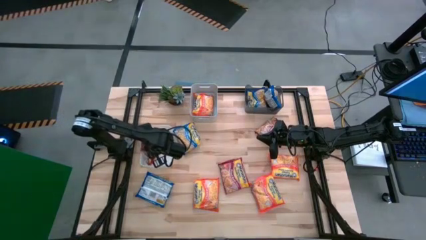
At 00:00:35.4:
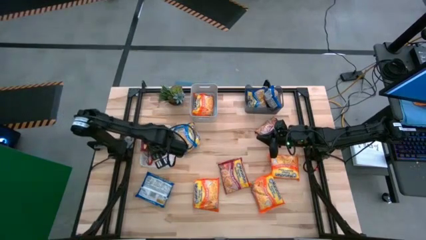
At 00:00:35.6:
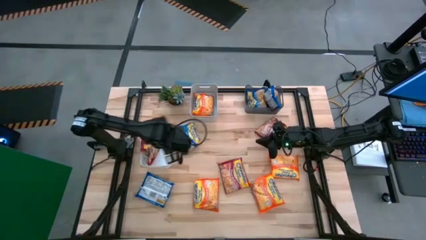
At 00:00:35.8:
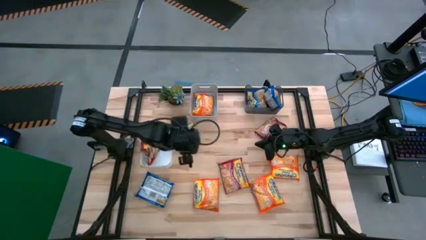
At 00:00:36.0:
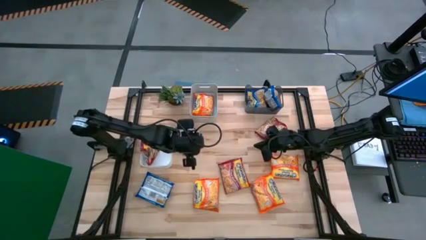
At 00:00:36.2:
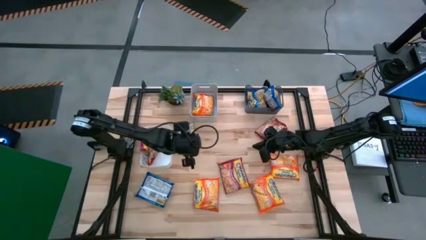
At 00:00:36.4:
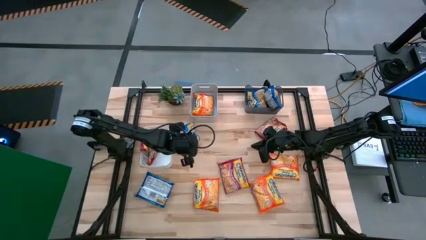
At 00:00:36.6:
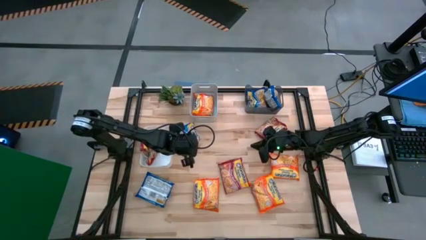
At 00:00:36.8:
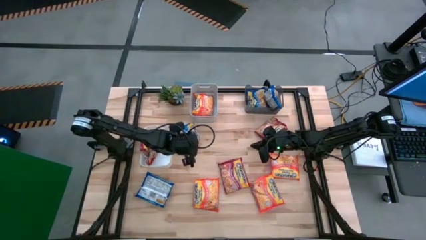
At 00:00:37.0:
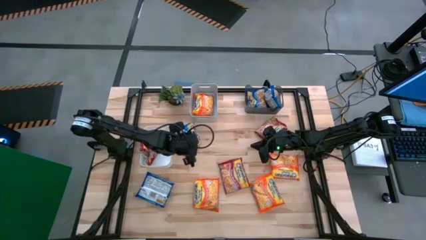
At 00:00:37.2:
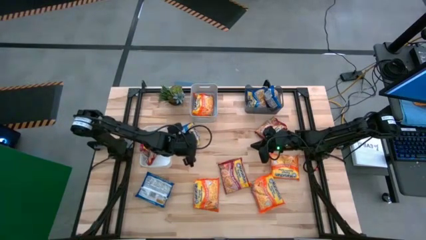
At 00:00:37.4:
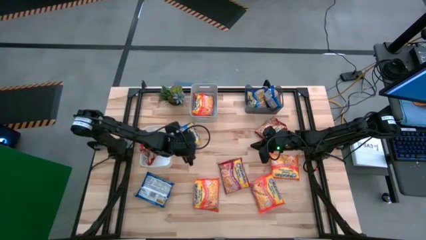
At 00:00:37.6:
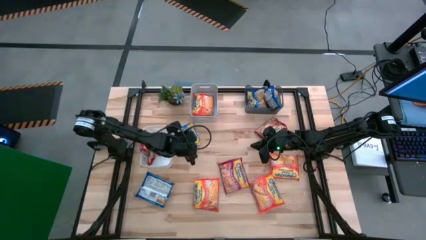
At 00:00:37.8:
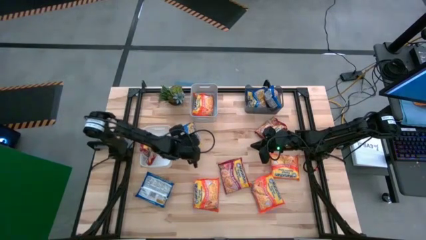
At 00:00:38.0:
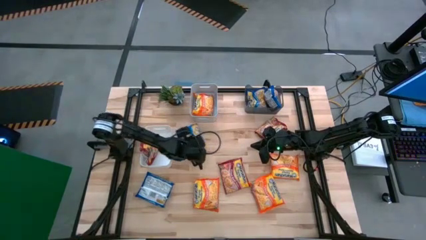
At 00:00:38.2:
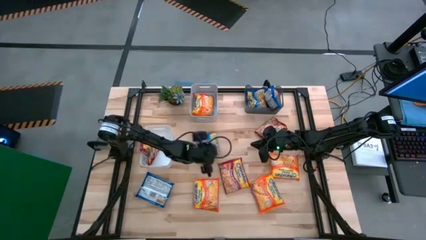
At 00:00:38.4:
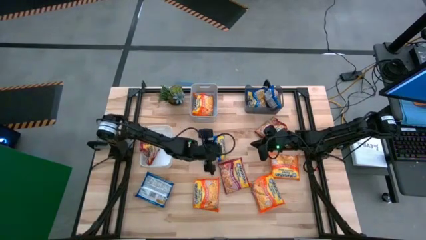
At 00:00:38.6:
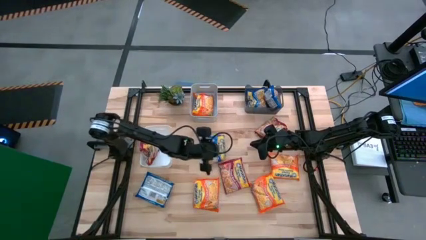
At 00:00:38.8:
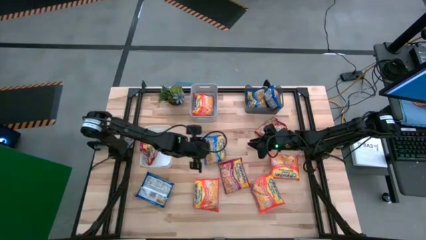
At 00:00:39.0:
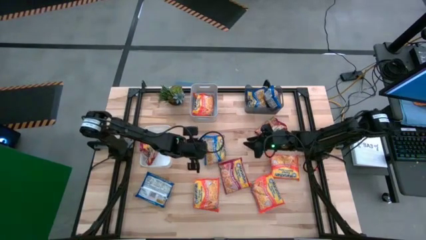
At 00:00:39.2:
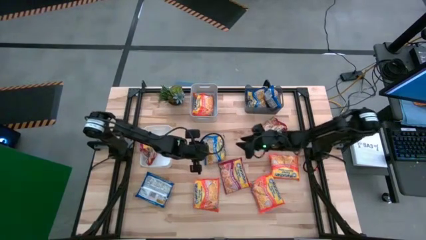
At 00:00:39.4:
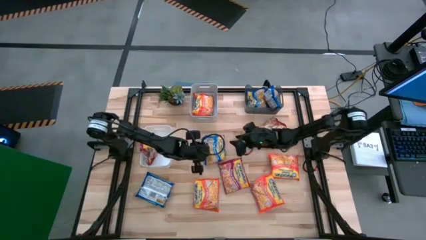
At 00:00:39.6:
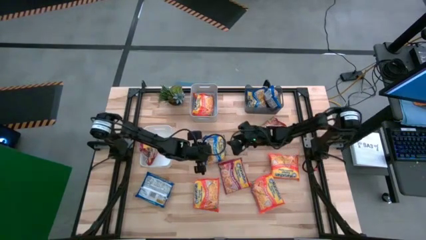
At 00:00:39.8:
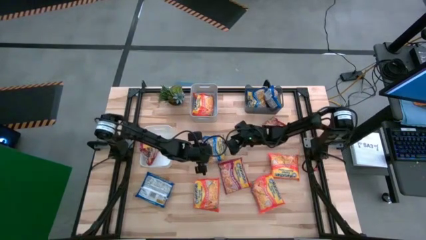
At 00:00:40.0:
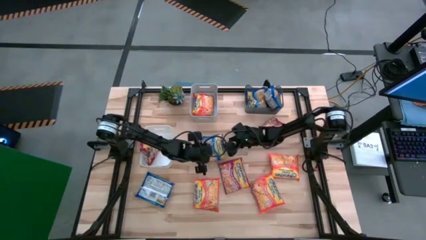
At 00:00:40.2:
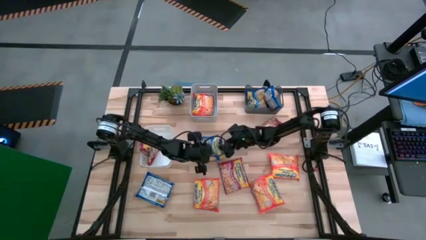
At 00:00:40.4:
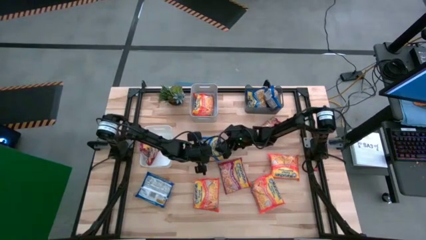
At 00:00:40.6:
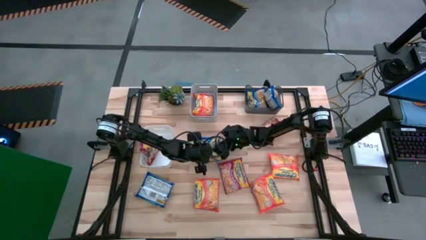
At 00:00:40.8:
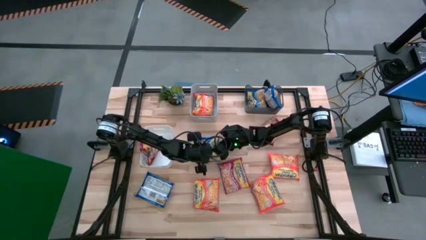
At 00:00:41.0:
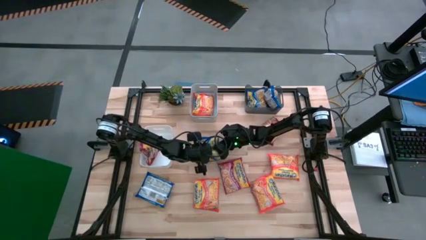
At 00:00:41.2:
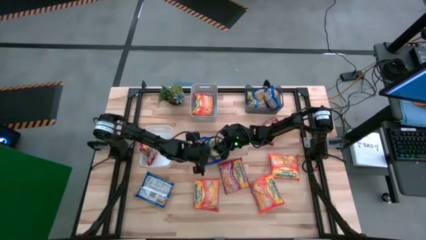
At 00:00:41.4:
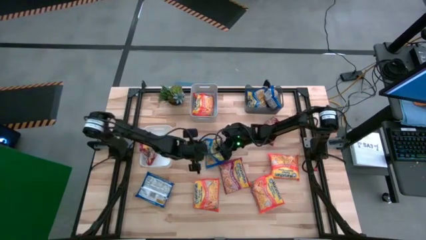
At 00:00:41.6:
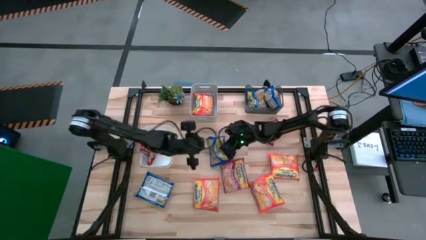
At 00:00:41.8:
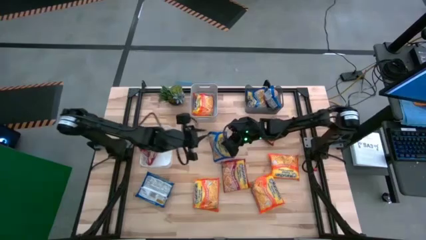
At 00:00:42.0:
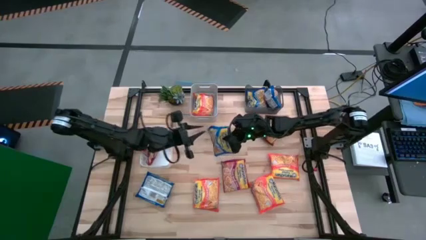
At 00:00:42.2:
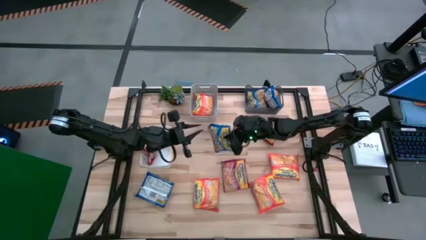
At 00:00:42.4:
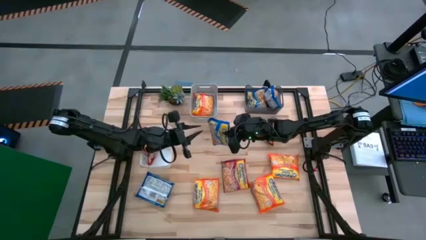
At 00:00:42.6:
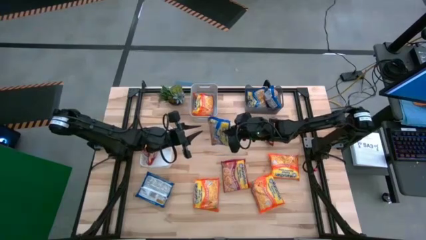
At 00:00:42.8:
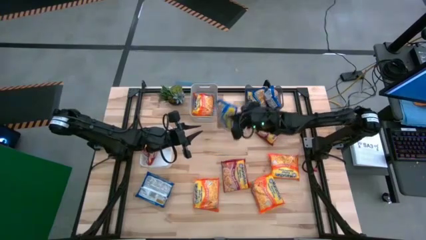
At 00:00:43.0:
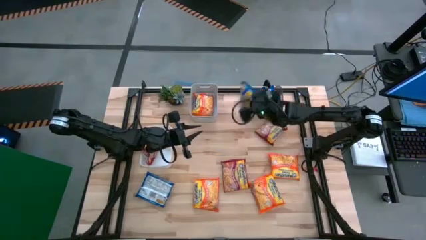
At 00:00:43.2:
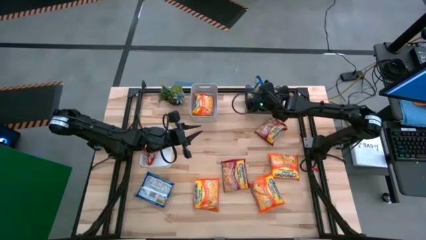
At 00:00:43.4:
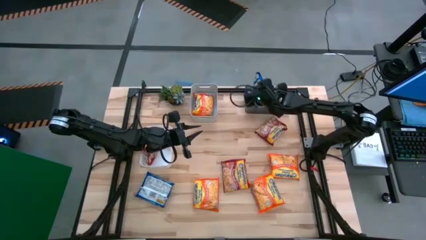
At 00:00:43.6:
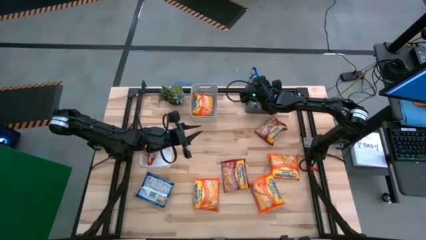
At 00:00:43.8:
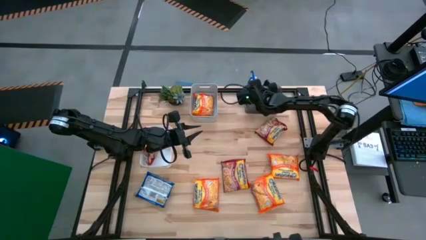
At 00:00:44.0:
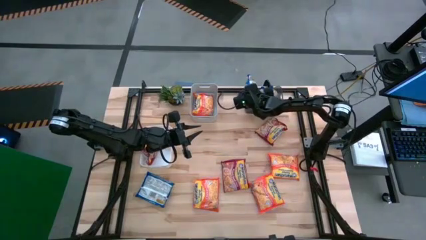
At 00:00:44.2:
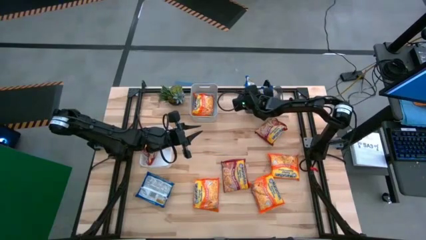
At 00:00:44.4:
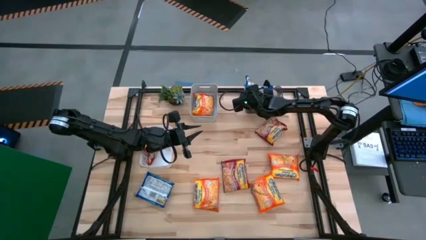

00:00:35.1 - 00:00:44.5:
Task: Sort Maruchan noodles
Put the blue noodle pack into the black bin

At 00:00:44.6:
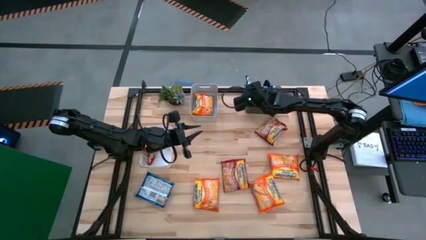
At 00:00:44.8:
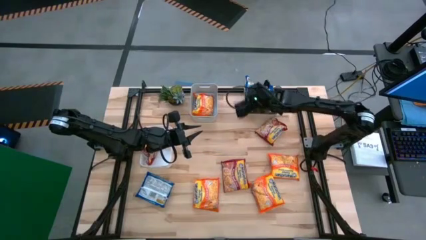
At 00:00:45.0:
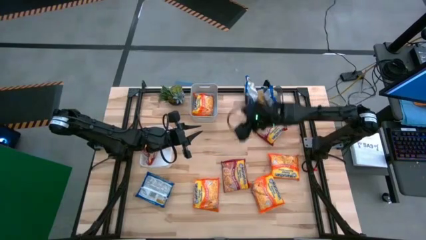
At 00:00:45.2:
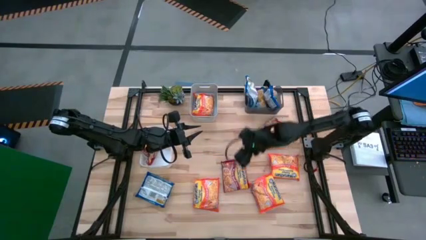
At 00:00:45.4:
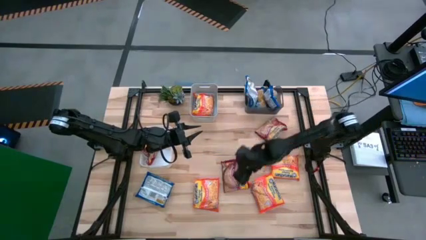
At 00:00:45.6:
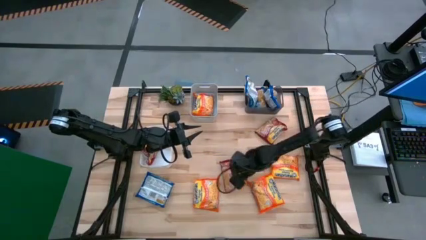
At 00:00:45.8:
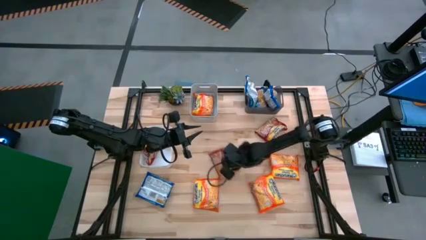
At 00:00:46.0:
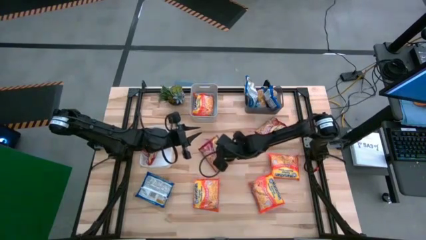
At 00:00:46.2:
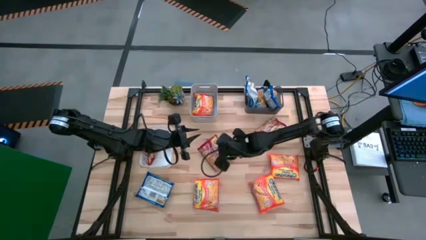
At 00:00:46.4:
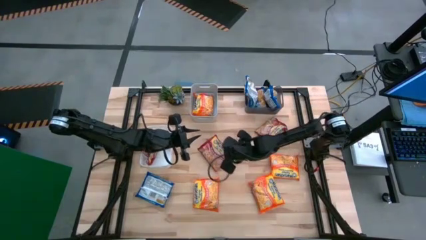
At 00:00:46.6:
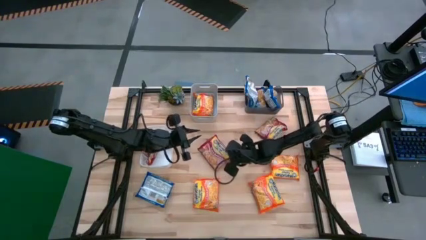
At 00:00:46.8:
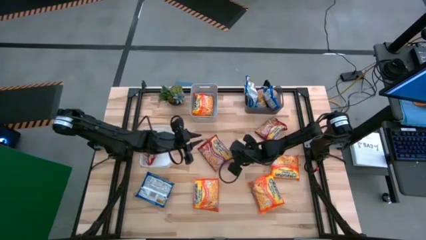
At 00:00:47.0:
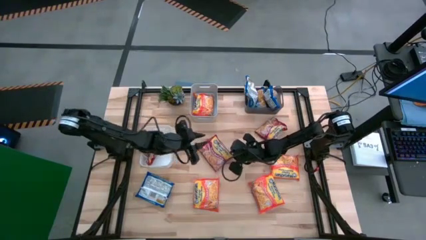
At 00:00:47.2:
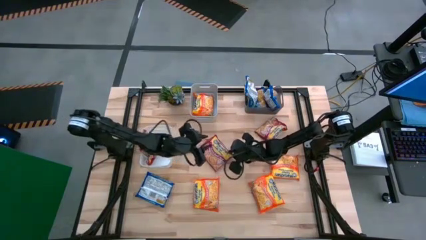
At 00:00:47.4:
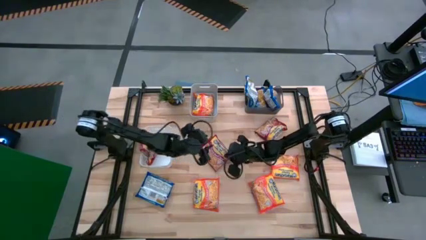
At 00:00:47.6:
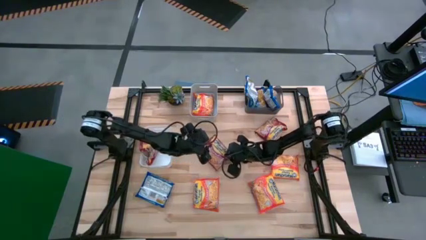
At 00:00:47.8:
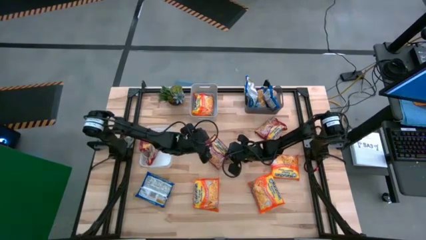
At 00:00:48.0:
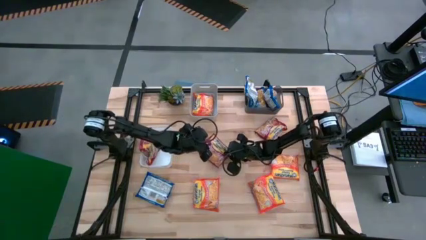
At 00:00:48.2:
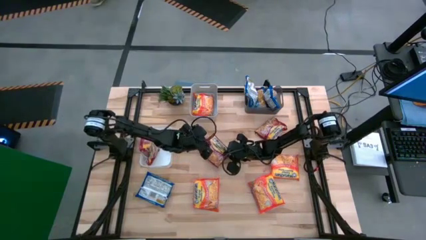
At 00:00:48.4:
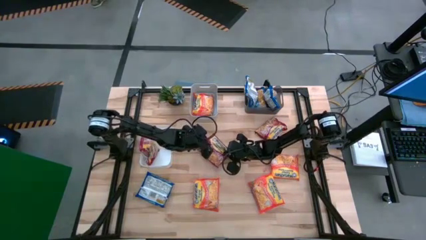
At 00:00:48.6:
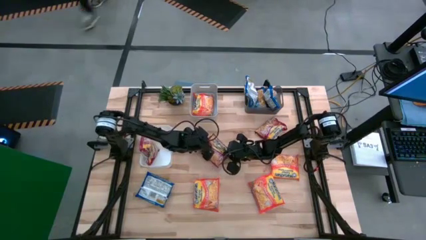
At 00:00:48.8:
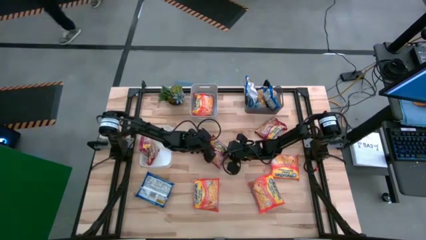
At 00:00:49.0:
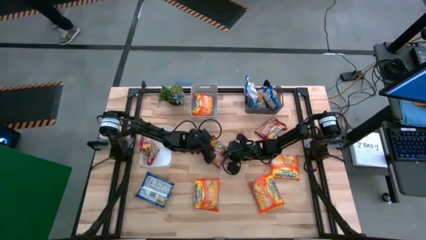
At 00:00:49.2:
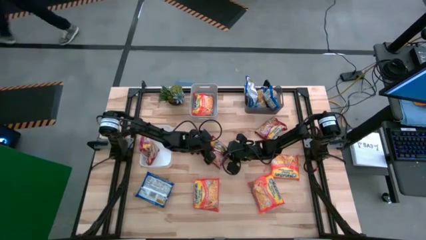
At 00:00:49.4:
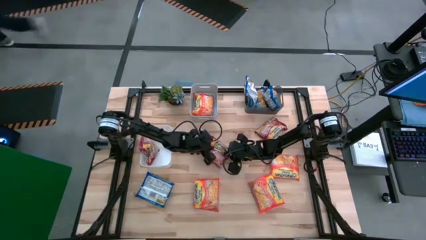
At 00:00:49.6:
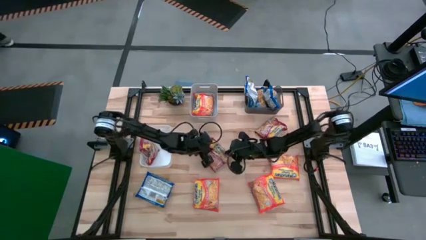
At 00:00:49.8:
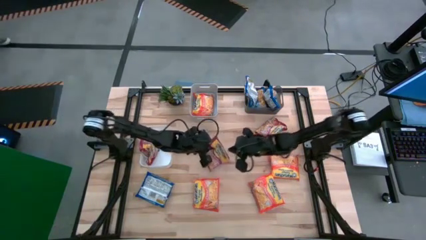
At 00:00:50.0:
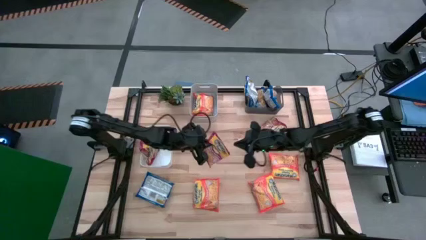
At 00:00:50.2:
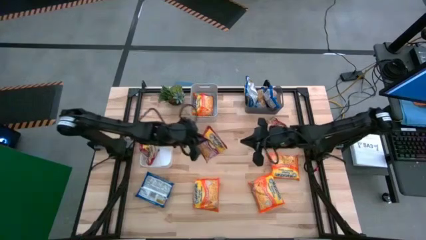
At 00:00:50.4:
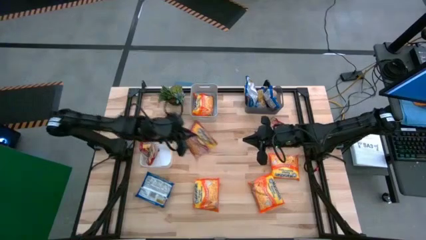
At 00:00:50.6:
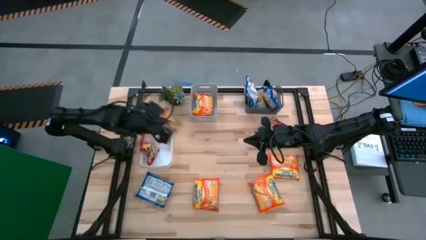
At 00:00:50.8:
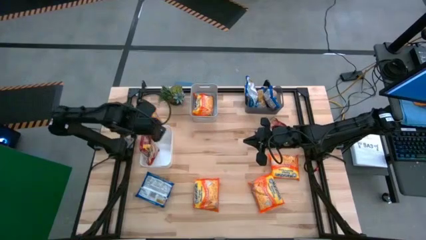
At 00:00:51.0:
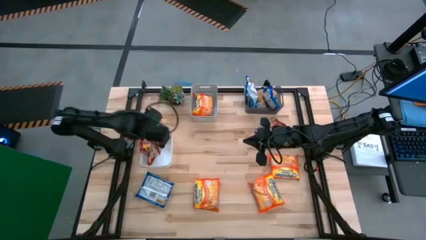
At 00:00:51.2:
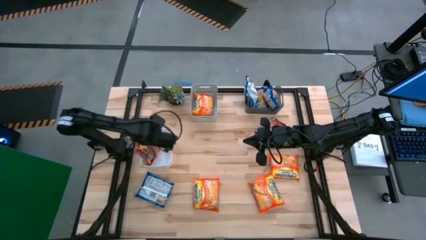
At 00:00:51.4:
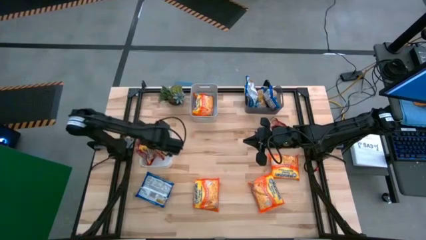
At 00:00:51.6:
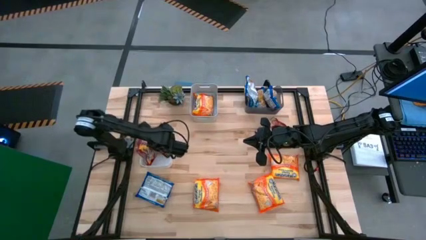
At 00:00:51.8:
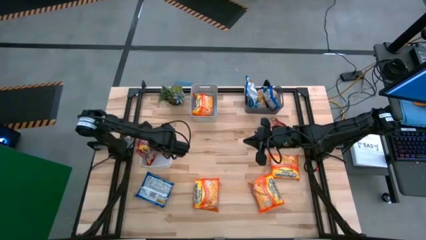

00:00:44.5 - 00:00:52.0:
Put the red noodle pack into the white bin
